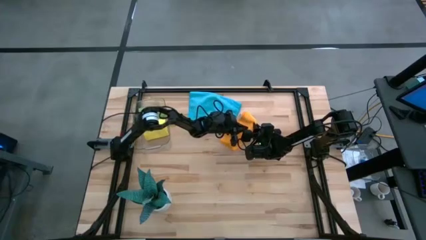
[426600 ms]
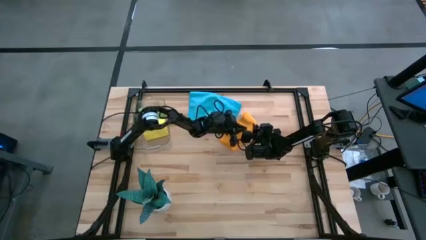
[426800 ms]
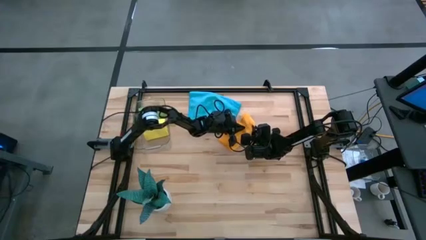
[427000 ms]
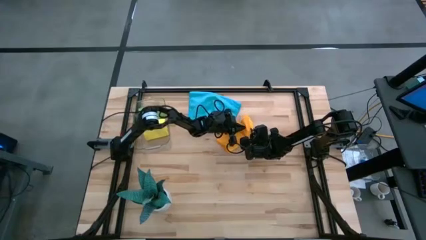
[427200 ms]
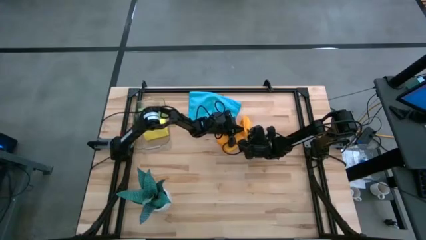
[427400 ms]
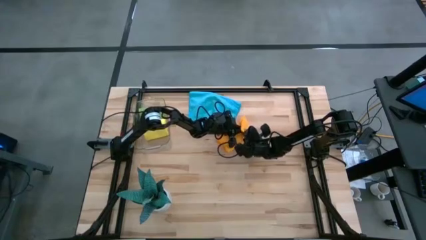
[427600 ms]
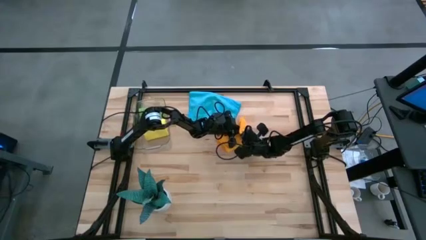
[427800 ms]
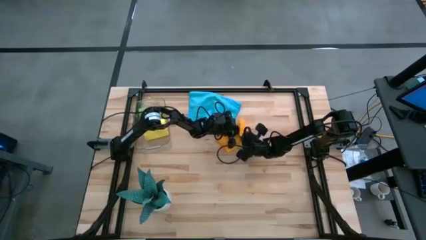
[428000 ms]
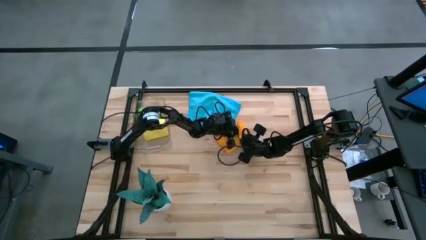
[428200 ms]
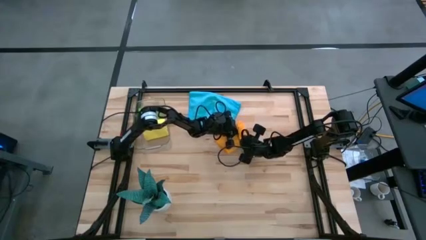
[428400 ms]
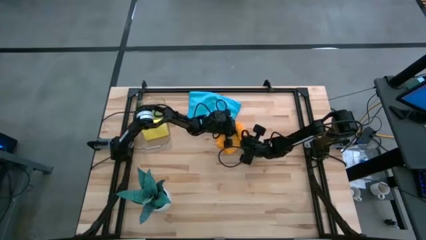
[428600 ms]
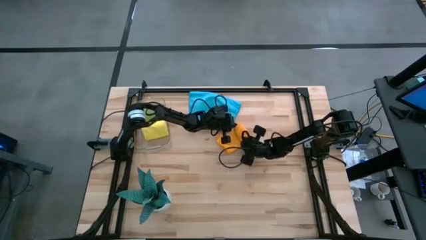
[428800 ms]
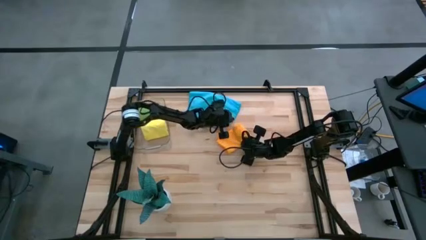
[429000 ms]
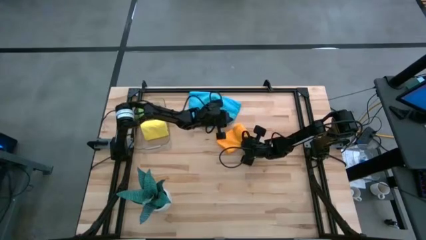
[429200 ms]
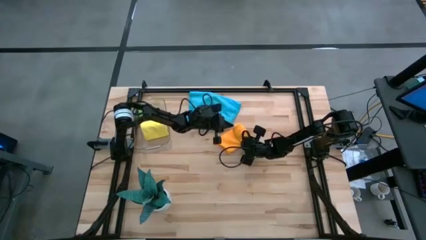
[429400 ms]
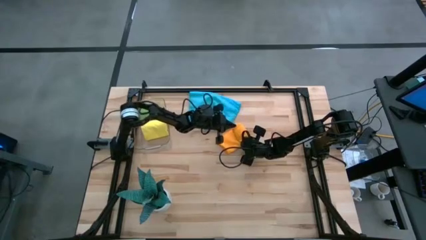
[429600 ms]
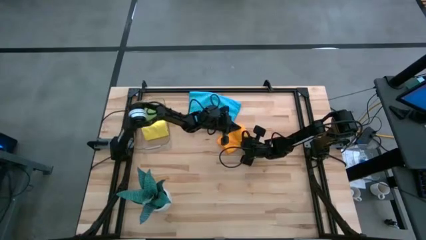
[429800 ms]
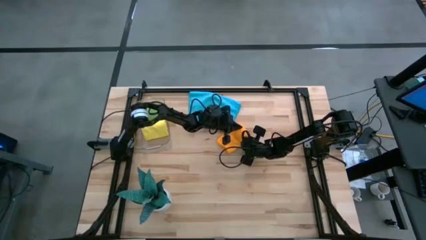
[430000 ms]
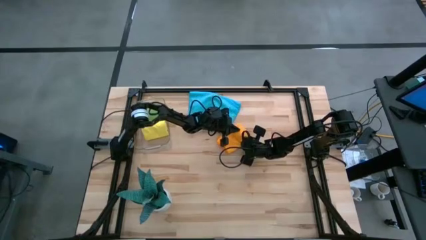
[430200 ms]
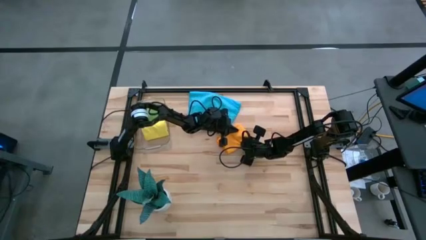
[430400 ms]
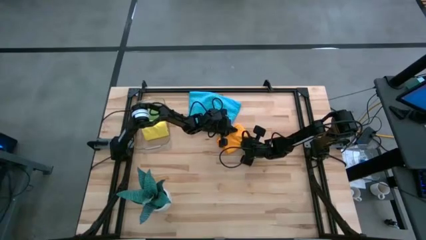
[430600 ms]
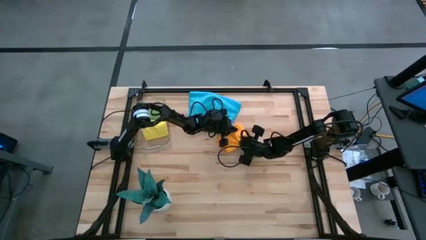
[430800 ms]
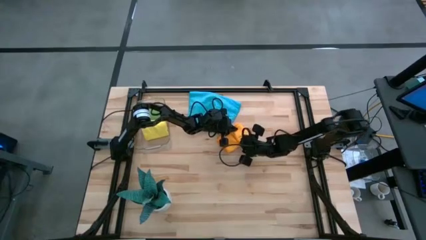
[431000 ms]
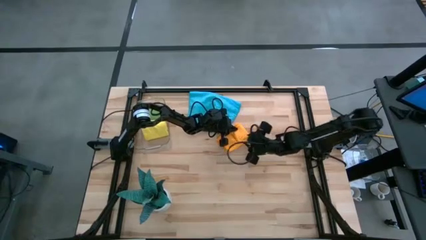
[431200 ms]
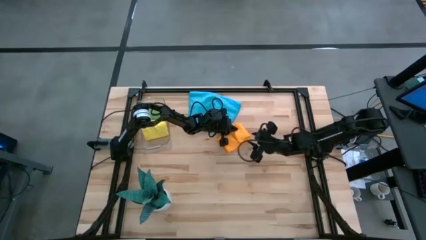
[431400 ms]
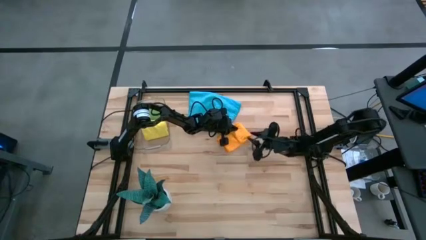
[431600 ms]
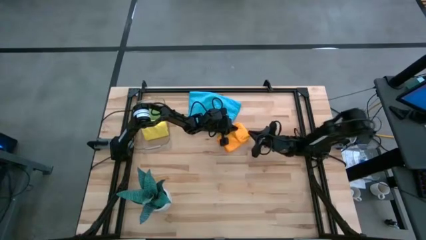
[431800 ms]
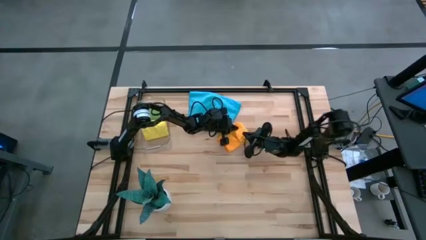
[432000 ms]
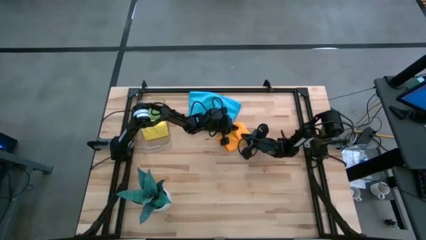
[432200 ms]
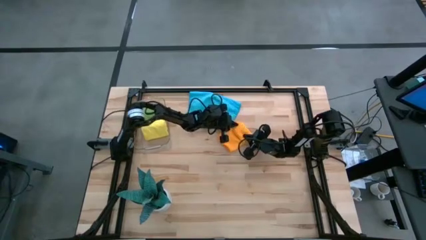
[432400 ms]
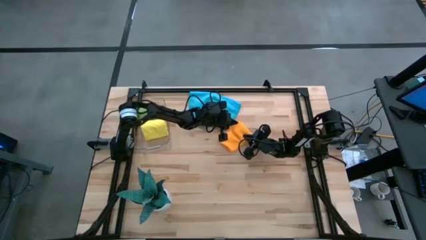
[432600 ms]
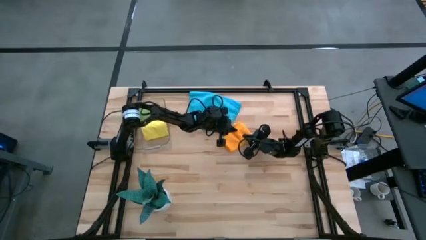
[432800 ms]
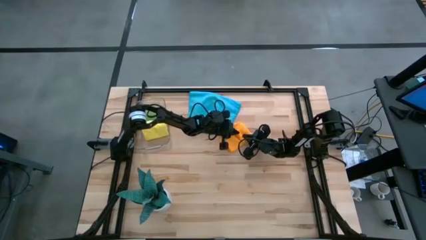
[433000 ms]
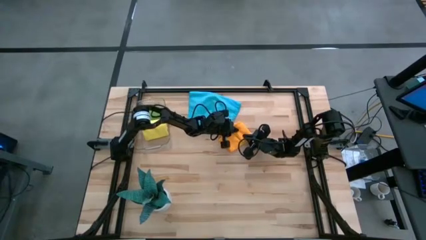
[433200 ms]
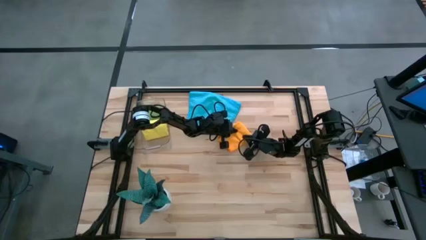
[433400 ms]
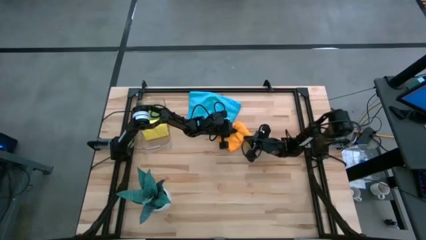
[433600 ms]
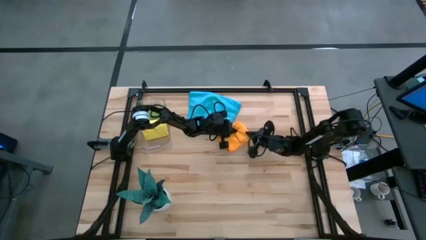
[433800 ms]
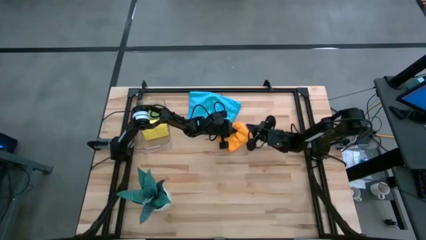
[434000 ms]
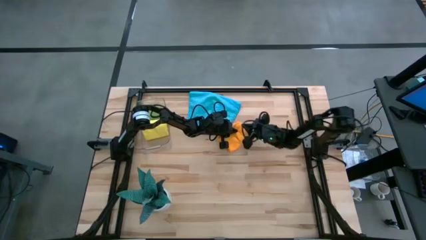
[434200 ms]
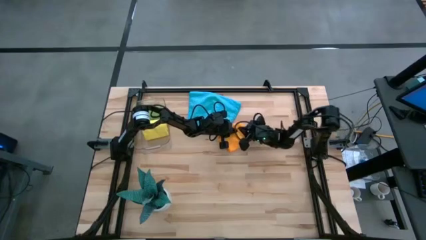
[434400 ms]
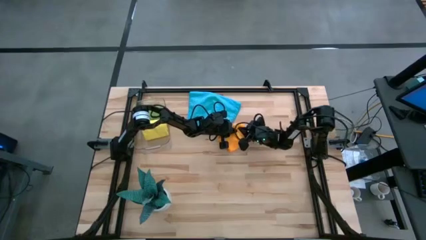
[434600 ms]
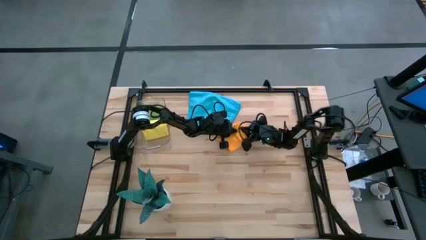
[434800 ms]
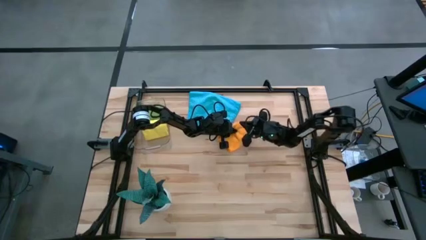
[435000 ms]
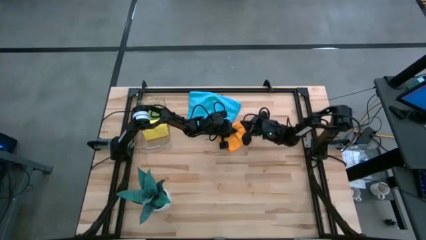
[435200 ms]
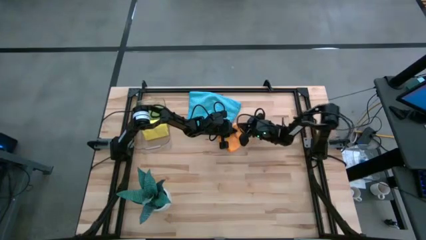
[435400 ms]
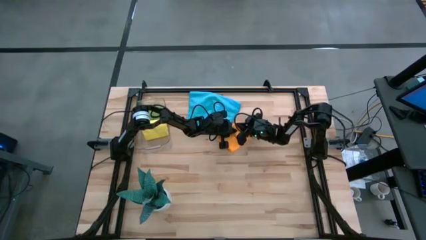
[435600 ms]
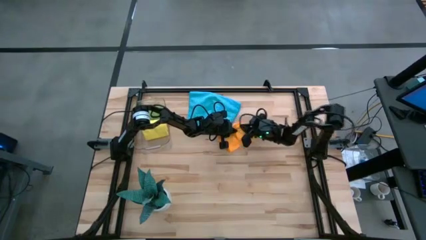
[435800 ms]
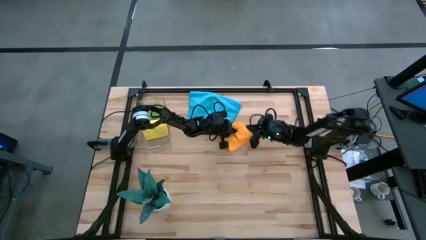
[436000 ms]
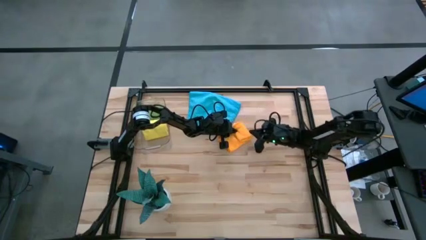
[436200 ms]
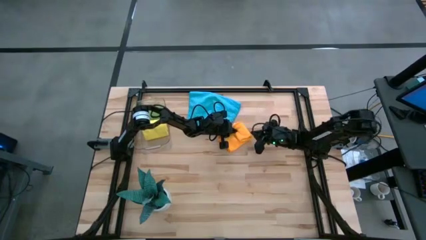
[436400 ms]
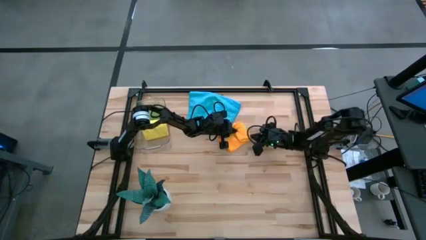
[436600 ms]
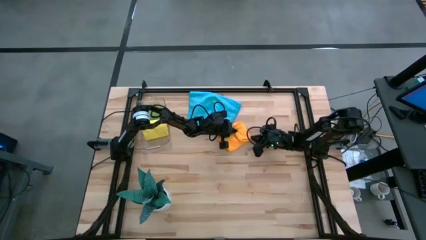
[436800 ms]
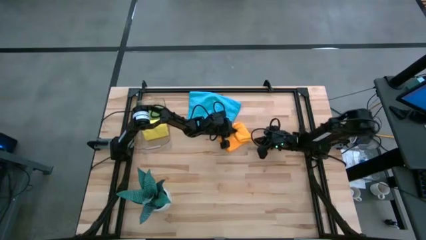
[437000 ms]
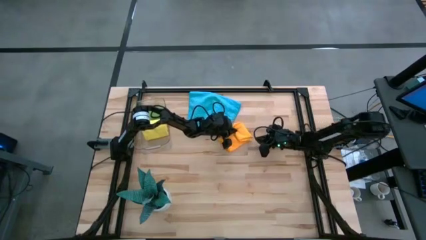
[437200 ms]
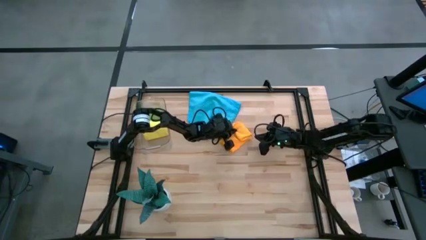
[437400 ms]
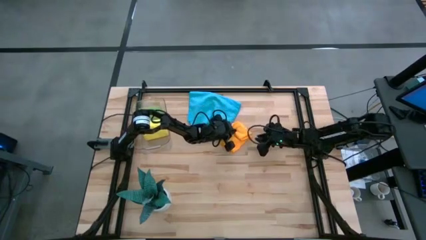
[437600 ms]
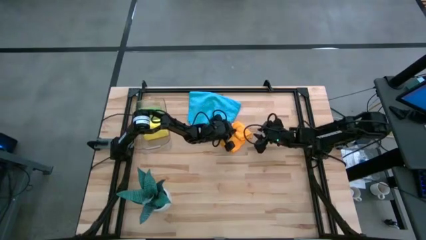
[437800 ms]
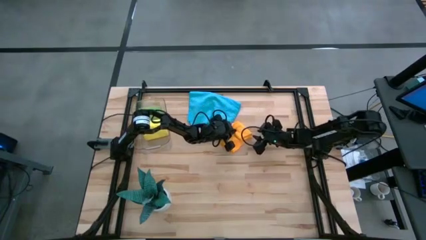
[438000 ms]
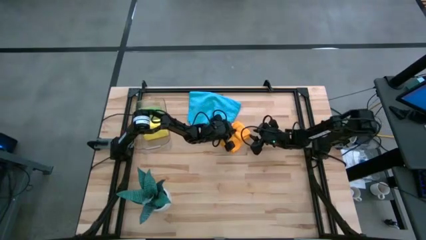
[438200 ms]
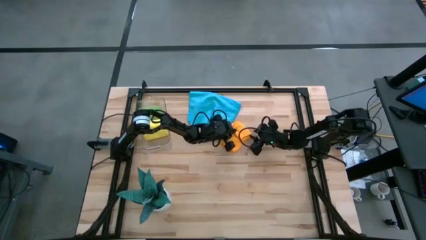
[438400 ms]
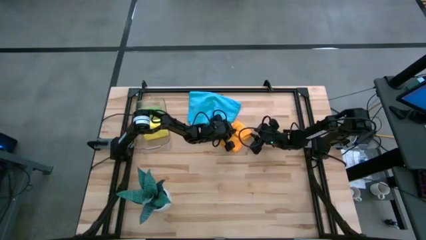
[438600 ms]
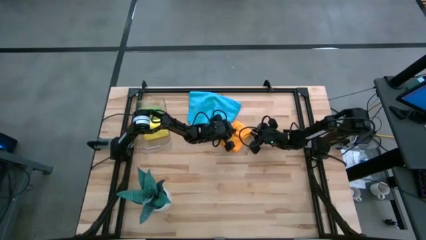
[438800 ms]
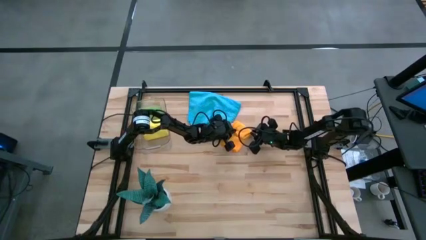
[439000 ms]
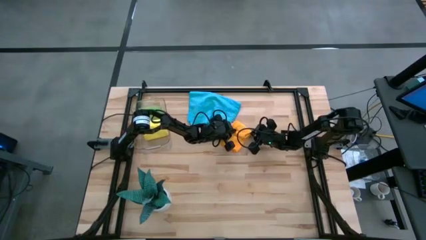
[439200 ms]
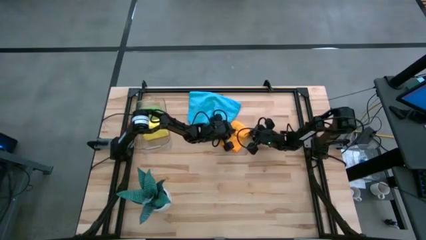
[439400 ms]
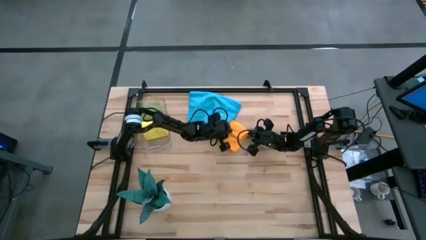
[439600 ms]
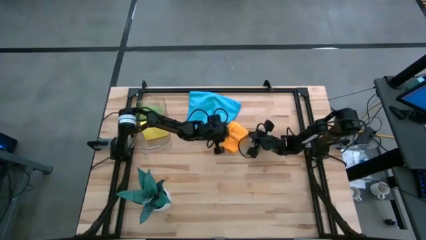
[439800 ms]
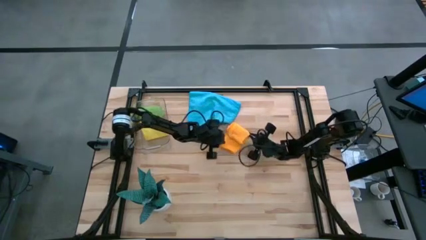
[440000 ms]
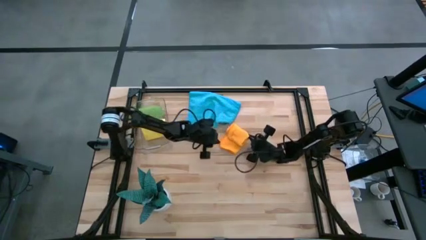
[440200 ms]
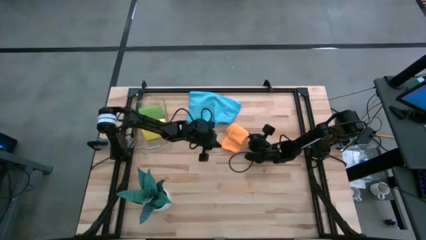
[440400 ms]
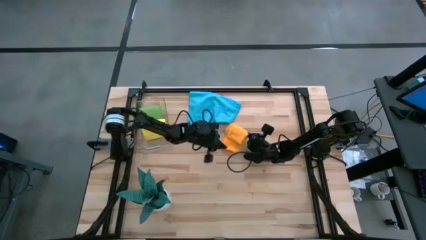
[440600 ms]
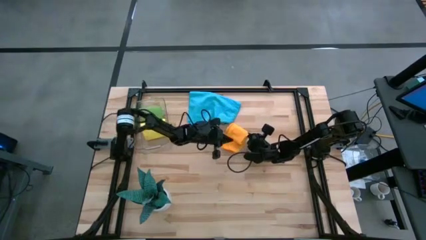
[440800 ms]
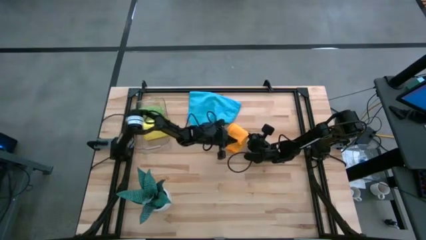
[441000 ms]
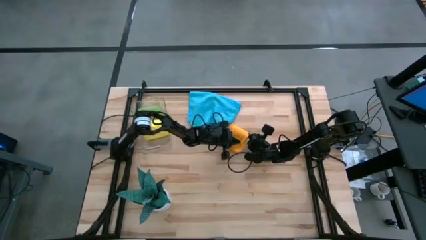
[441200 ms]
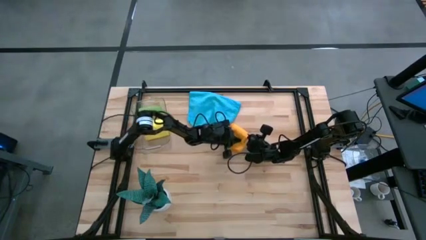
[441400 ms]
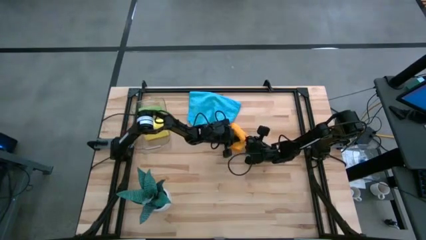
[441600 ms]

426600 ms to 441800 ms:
Task: Roll microfiber towels into tight, uniform cylinder then place into a basket
Roll the orange microfiber towel

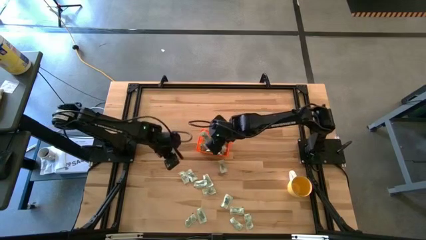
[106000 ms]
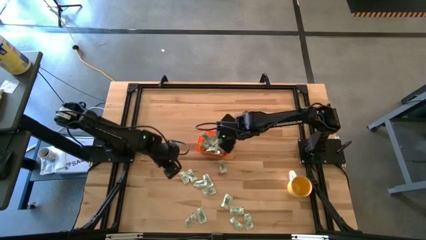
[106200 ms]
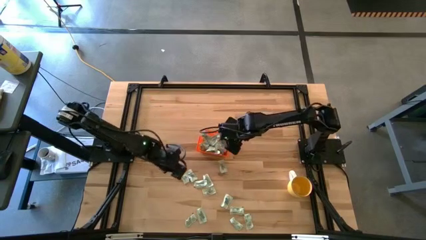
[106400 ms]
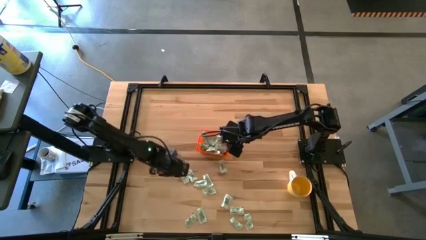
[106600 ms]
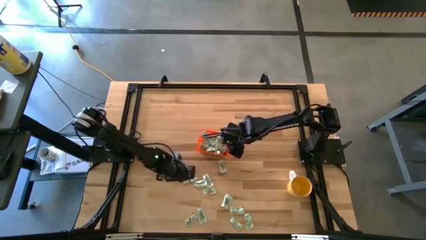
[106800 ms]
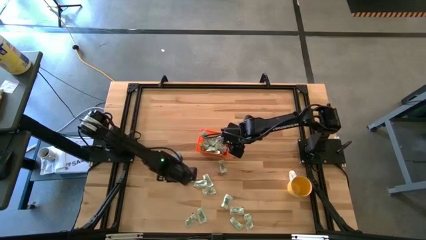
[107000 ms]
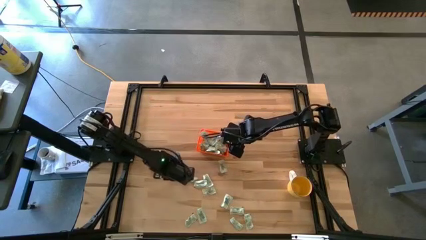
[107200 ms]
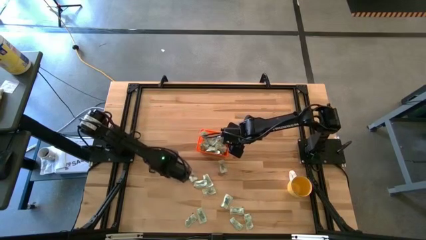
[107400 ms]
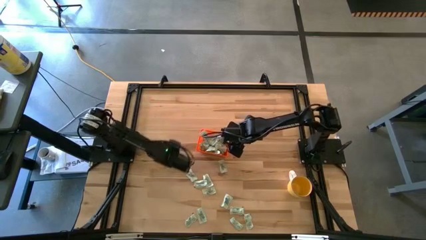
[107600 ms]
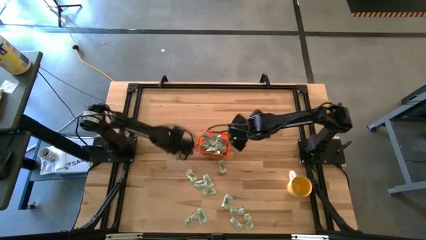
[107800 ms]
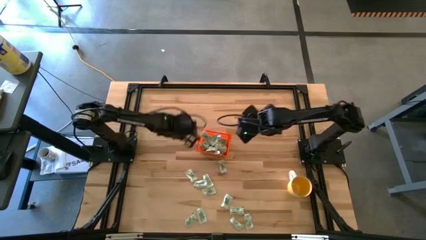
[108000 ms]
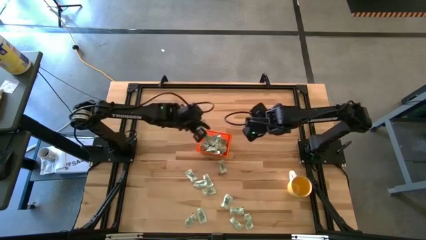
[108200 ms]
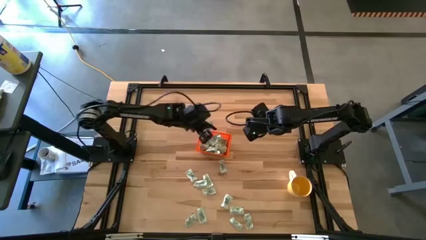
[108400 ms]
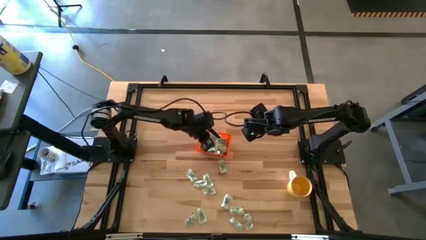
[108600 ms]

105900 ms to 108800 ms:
Task: Pick and place Stevia / Truvia into bins
Put the light green stevia packet into the orange bin
